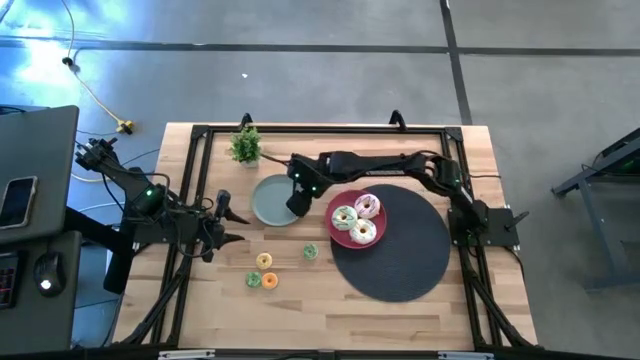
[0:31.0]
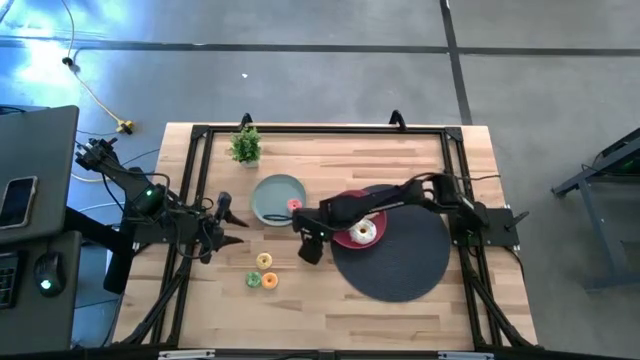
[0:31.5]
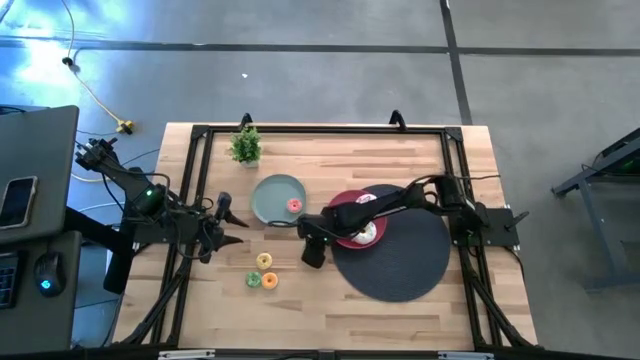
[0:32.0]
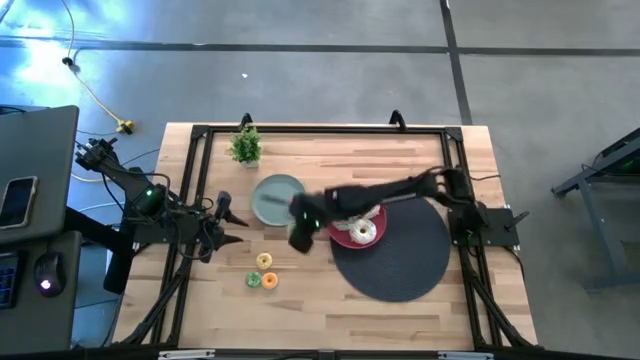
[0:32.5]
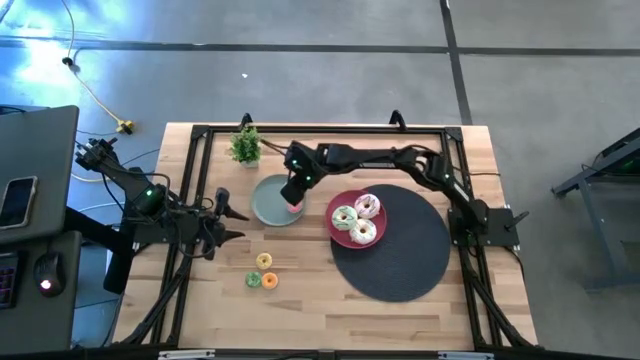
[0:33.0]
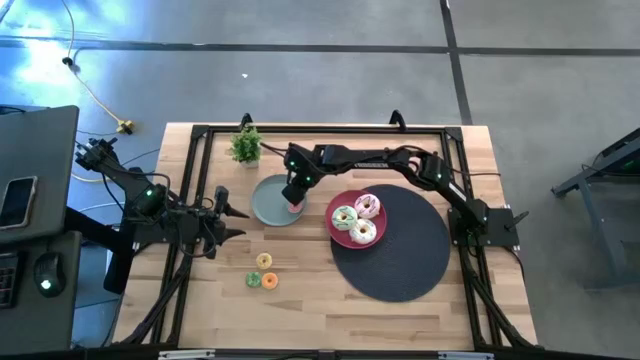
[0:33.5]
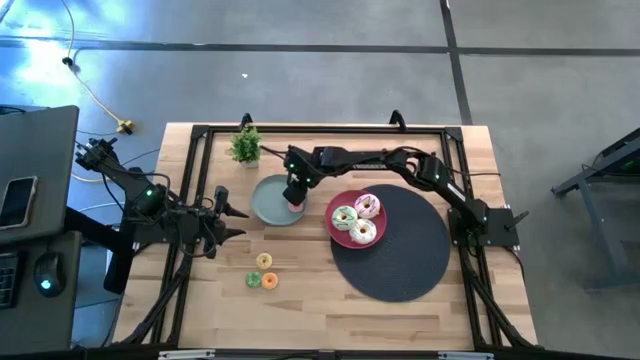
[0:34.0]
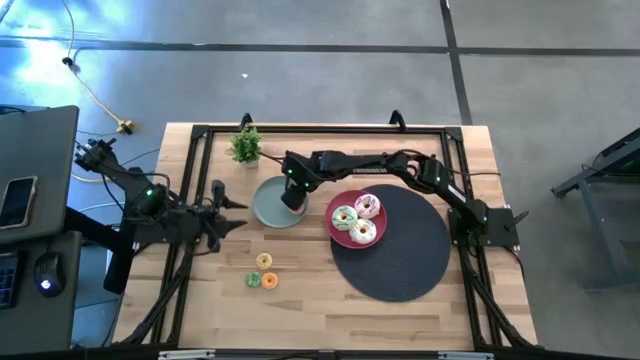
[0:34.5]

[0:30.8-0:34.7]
Task: Pick & Place donuts
Put the top small green donut on the blue plate

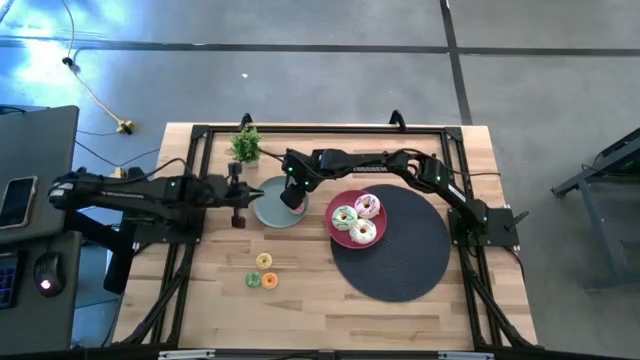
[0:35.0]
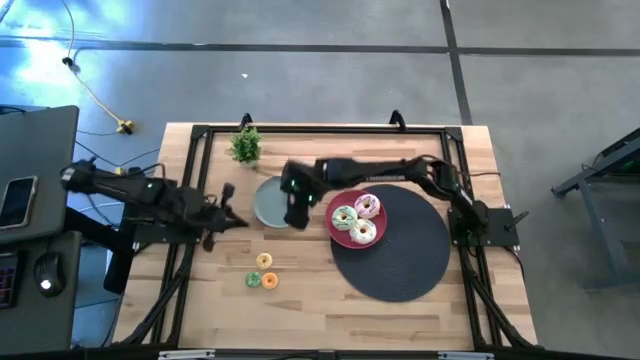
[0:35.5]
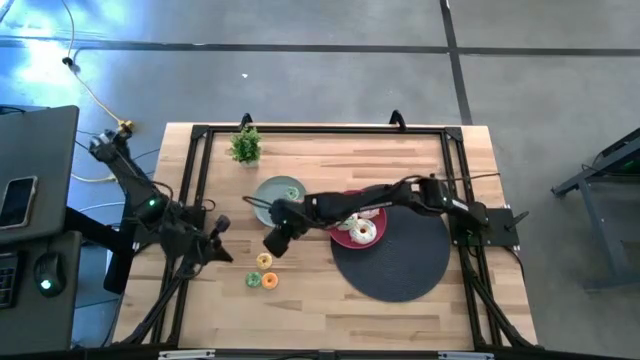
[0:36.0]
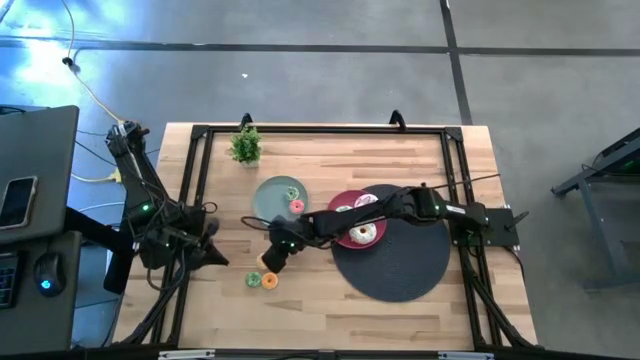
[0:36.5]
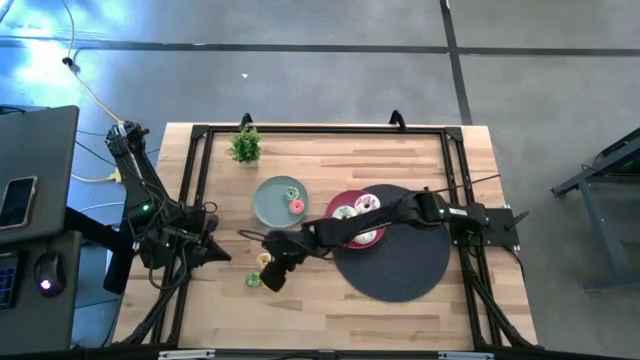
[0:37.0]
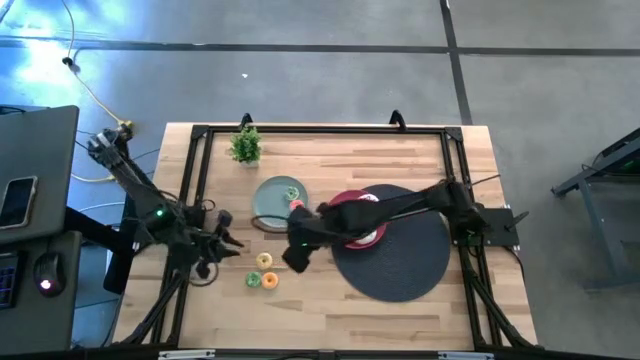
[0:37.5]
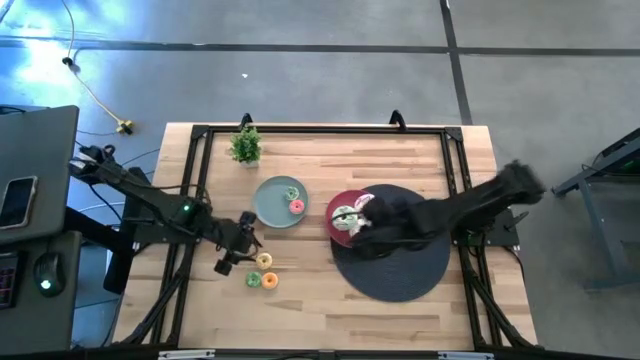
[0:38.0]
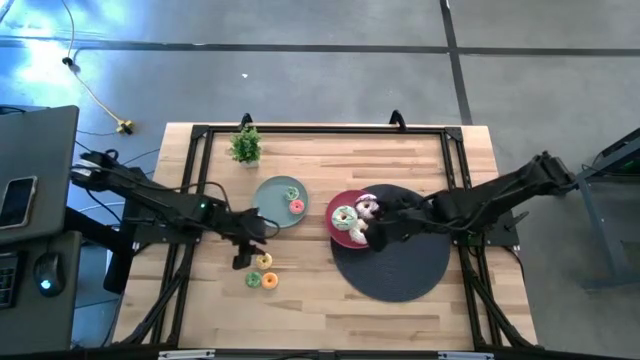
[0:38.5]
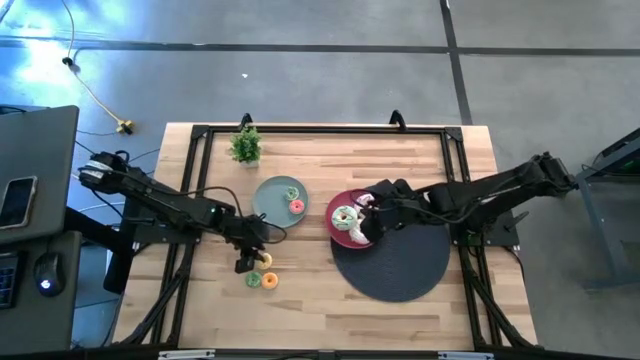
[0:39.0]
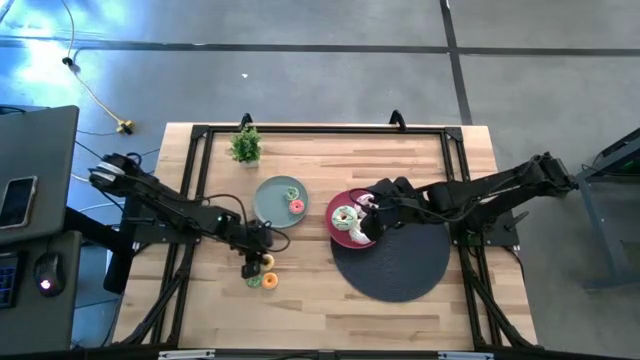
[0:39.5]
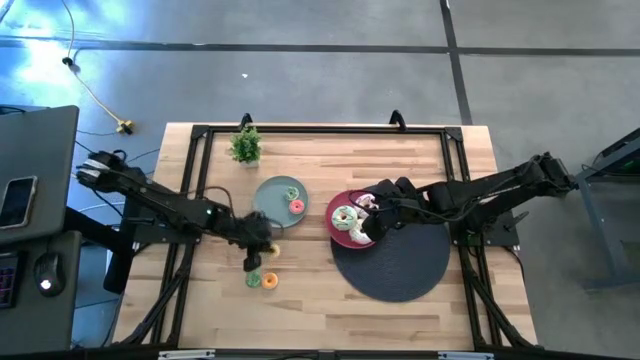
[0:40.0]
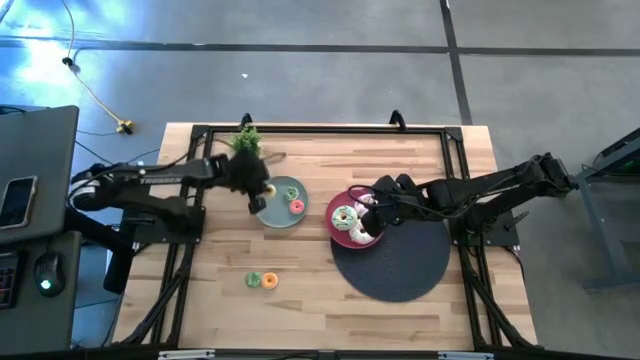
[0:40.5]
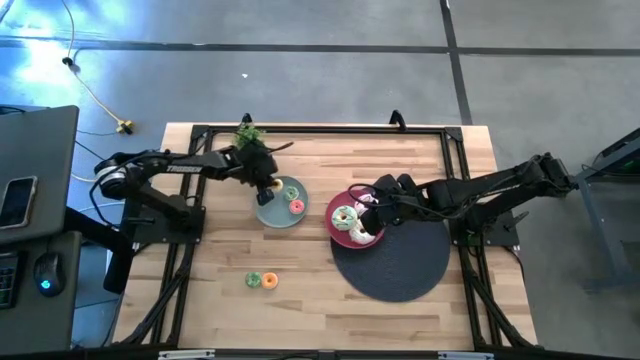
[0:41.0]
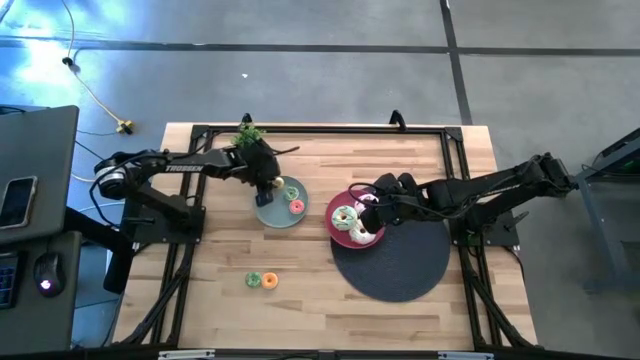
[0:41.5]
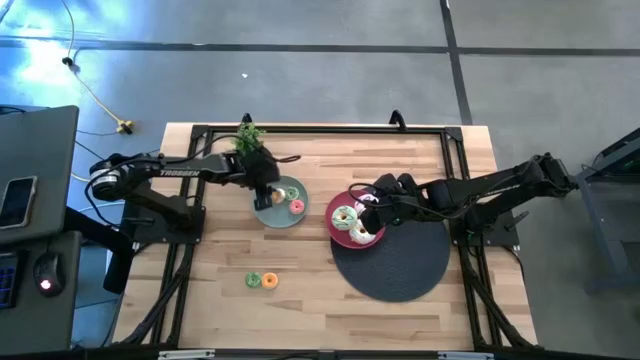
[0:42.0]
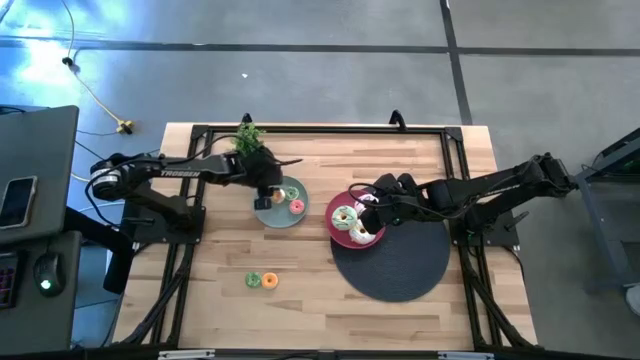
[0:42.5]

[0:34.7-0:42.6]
Put the small yellow donut on the blue plate

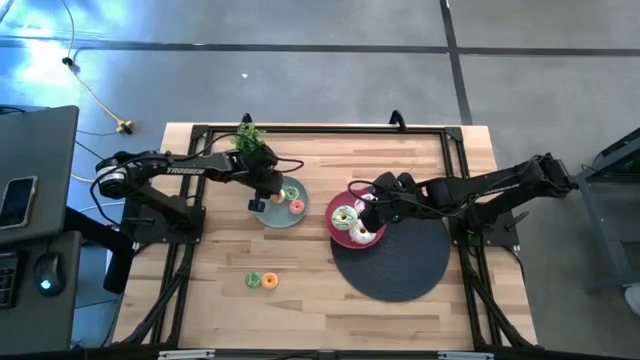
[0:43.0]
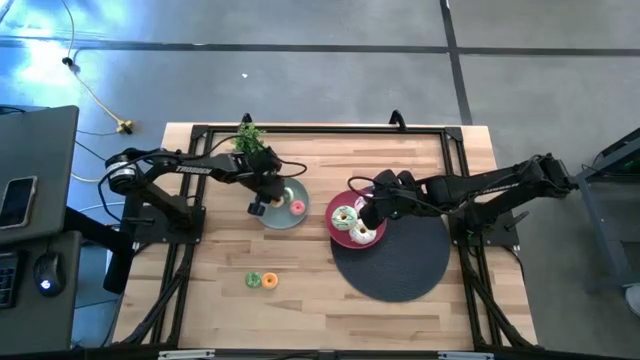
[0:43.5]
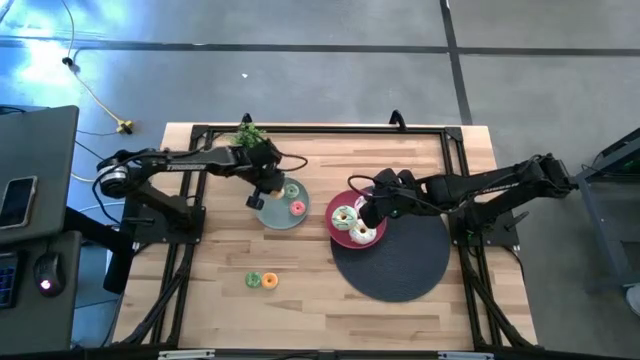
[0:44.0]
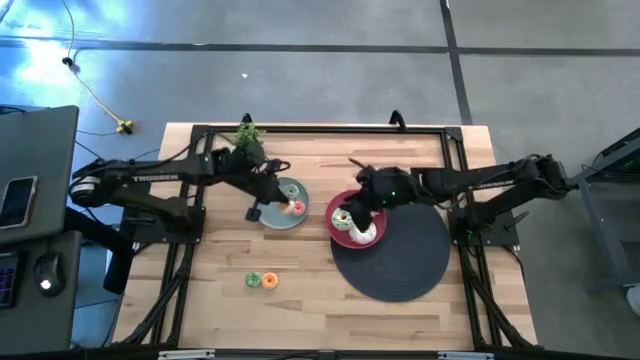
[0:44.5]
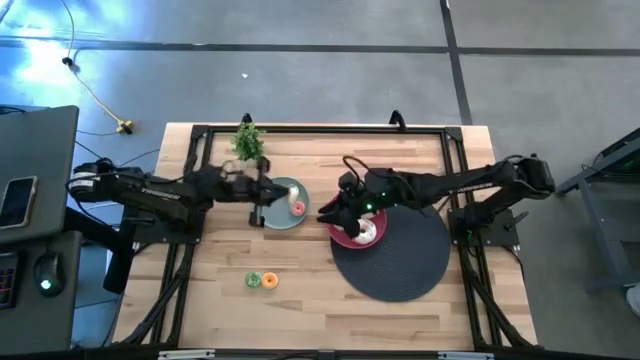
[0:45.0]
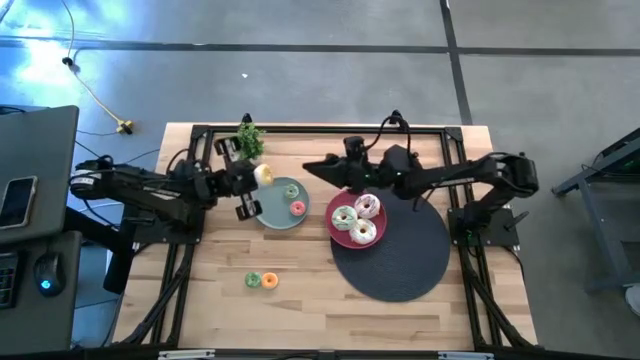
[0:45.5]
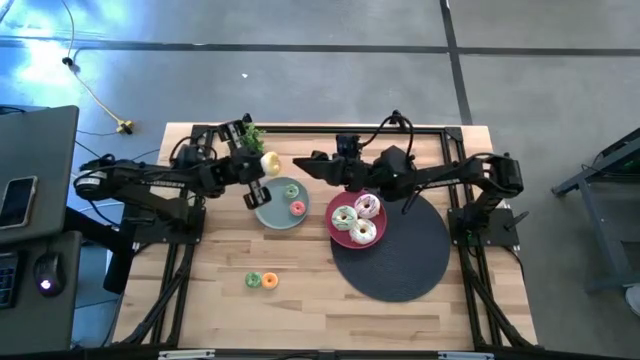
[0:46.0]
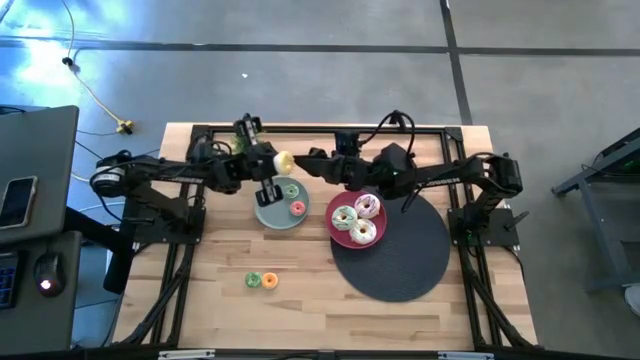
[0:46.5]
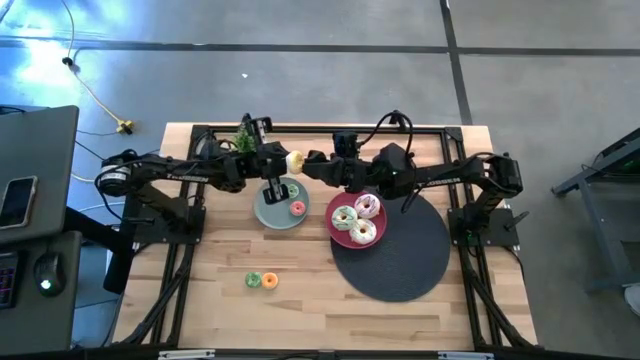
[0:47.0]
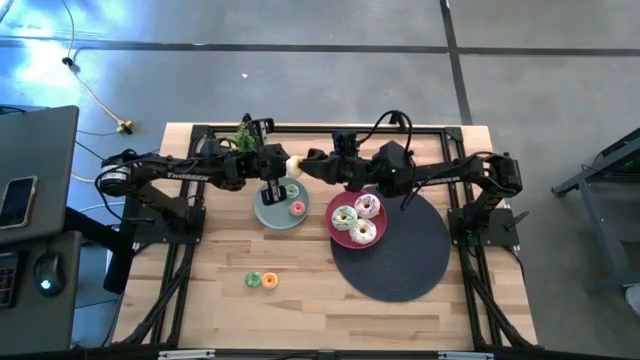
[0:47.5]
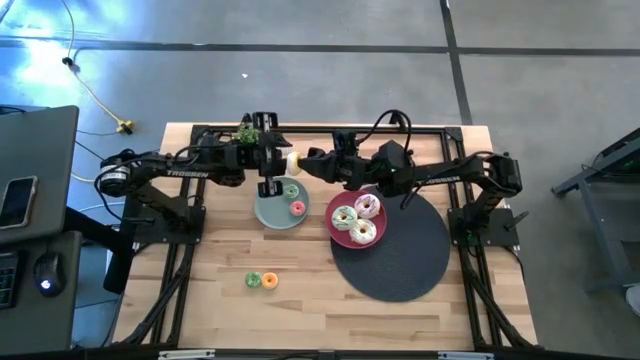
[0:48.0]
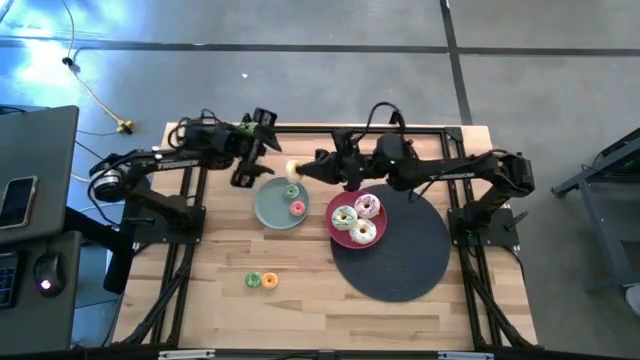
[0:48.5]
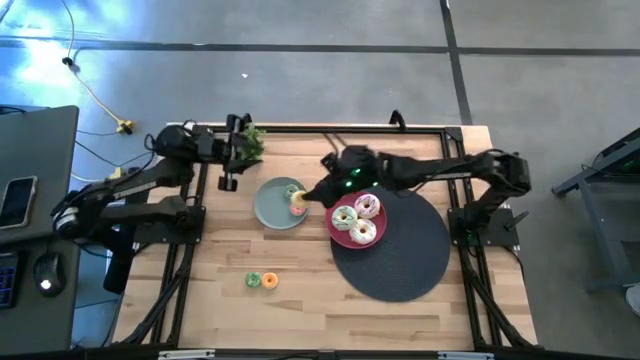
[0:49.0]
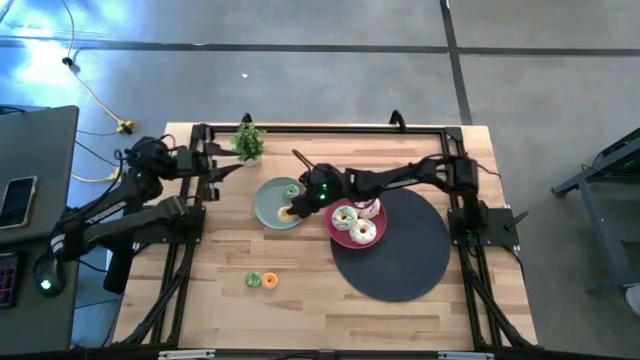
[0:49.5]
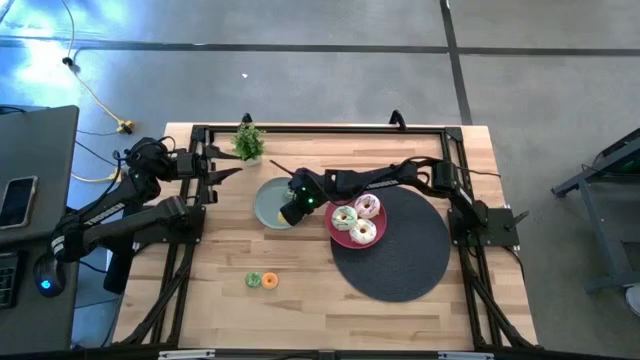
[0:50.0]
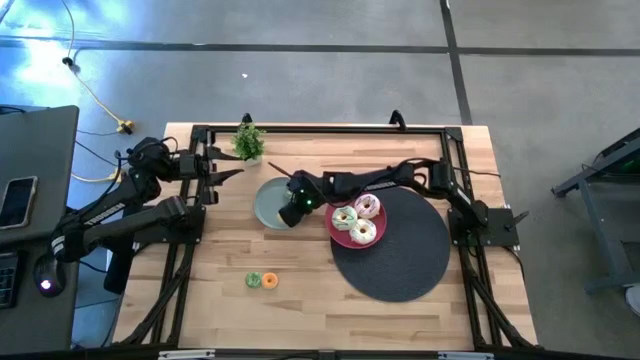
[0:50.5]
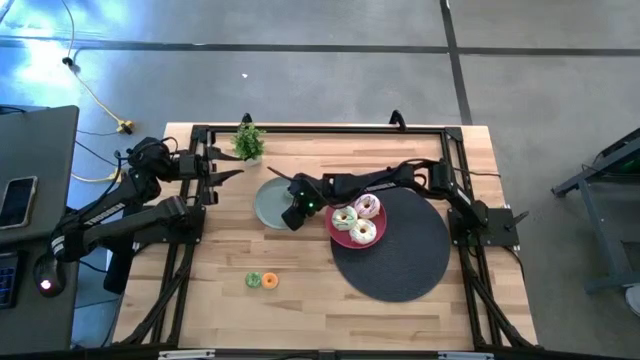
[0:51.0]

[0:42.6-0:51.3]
Put the small yellow donut on the blue plate

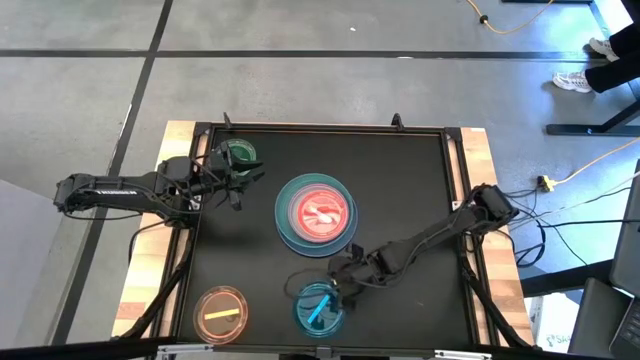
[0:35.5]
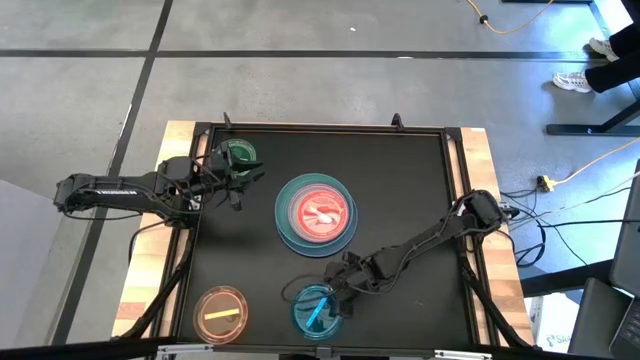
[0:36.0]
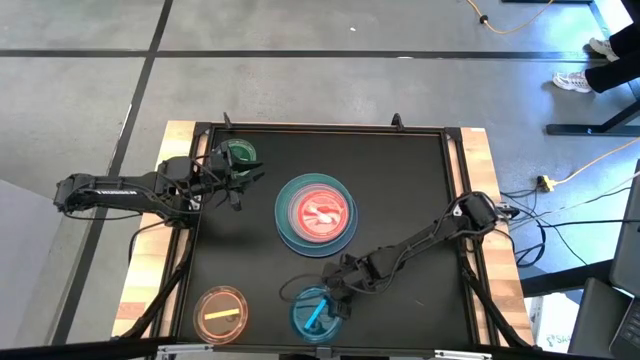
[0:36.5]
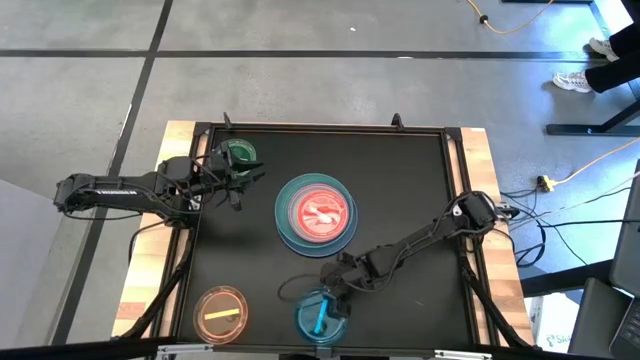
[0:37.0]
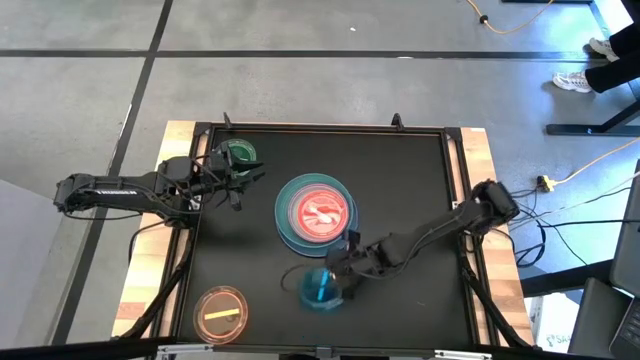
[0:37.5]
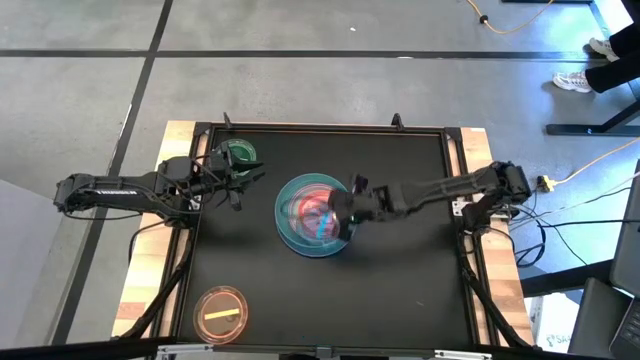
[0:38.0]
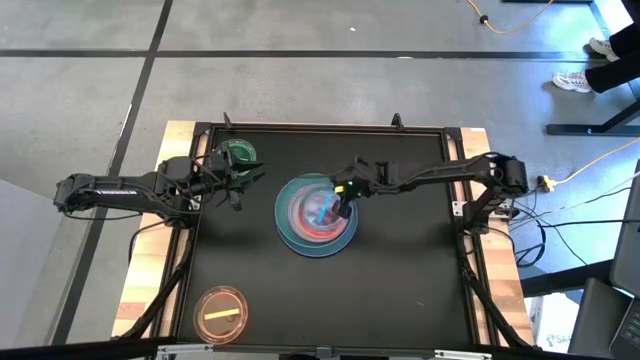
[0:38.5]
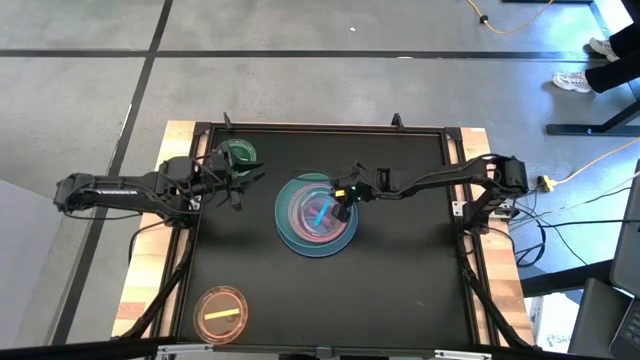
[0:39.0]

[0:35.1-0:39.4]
Task: Stack plastic plates
Stack the light blue plate on top of the light pink plate
